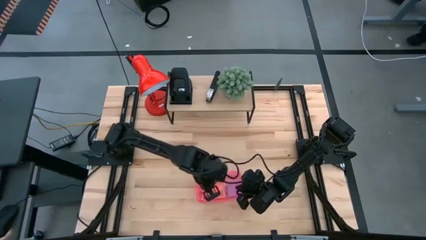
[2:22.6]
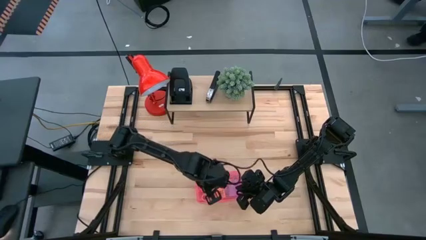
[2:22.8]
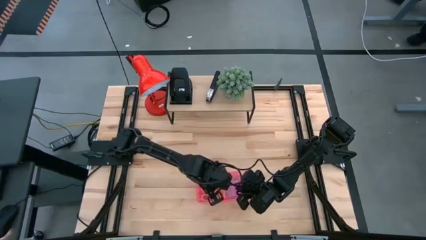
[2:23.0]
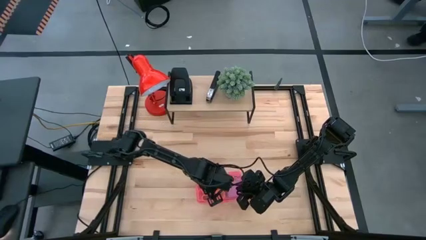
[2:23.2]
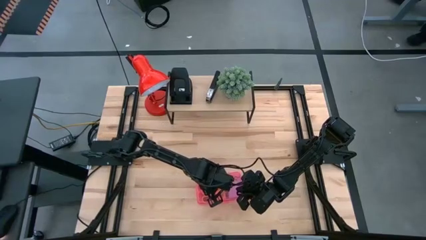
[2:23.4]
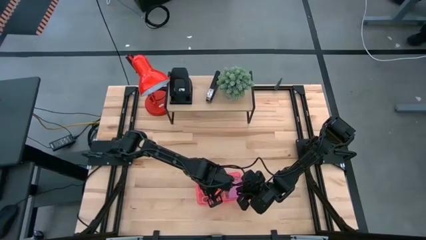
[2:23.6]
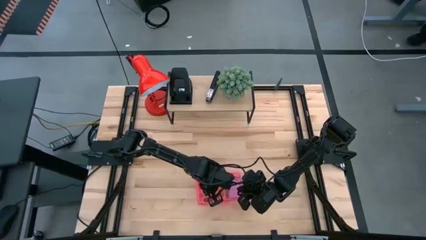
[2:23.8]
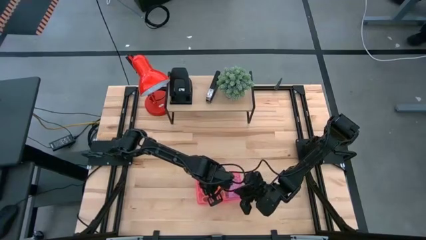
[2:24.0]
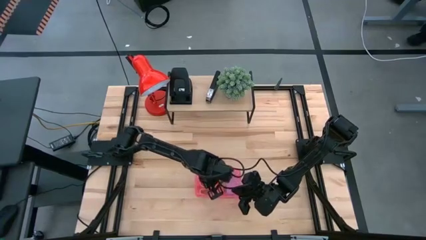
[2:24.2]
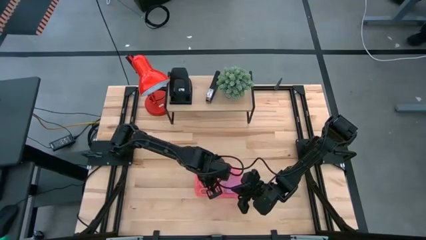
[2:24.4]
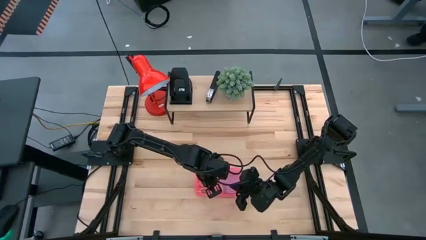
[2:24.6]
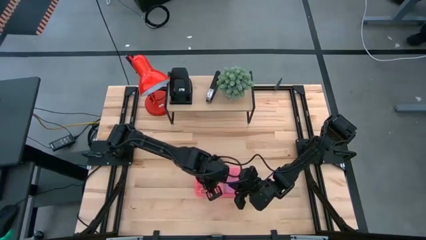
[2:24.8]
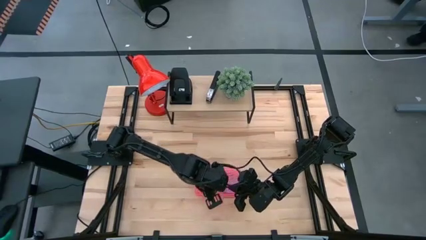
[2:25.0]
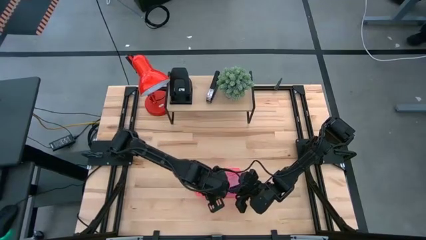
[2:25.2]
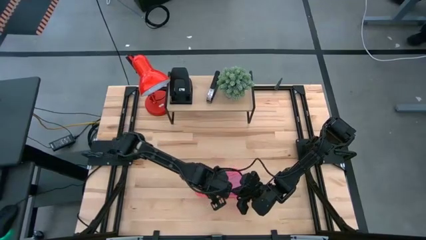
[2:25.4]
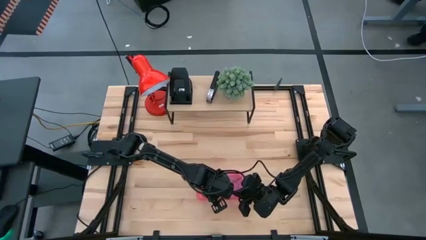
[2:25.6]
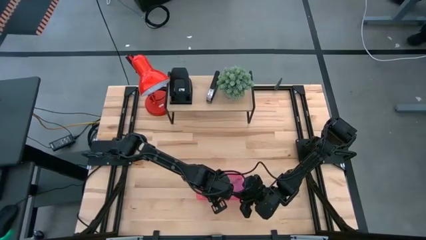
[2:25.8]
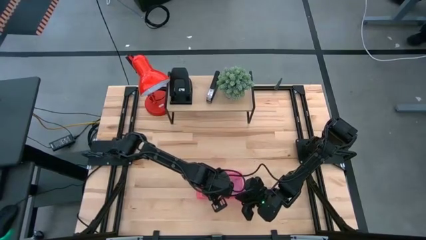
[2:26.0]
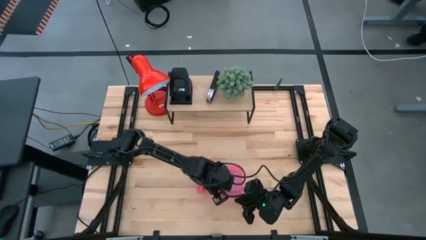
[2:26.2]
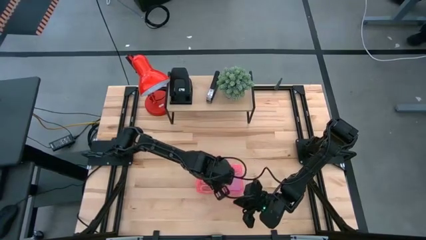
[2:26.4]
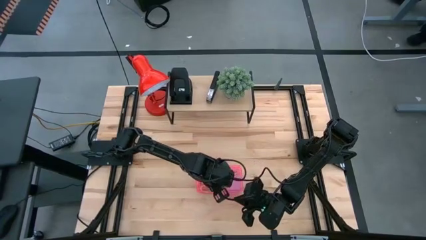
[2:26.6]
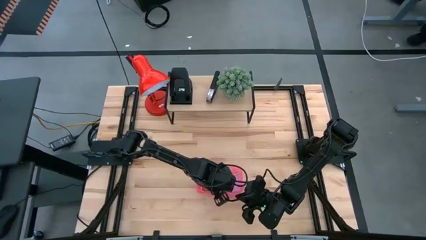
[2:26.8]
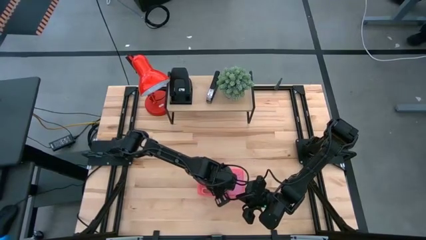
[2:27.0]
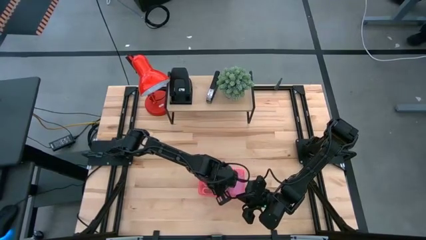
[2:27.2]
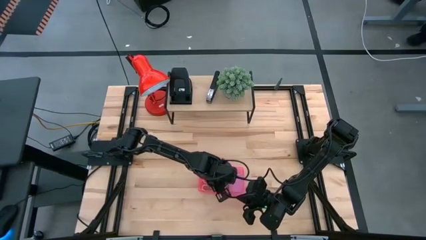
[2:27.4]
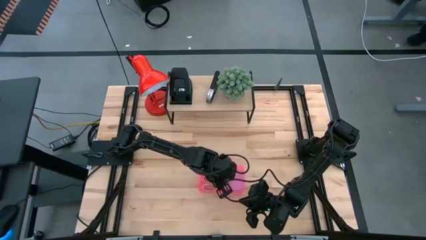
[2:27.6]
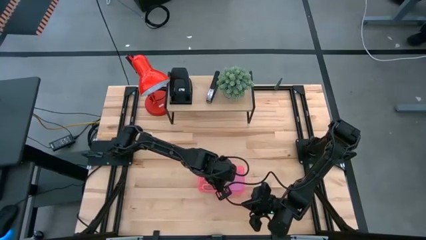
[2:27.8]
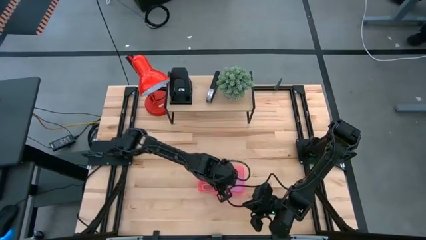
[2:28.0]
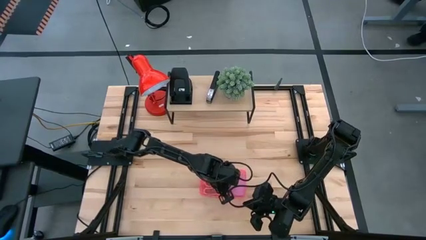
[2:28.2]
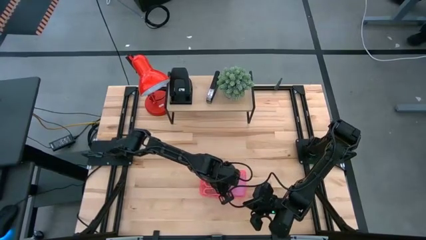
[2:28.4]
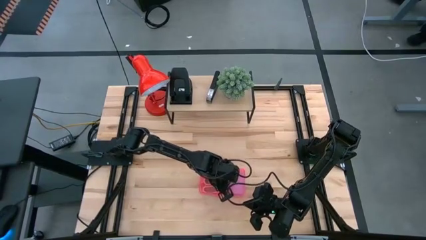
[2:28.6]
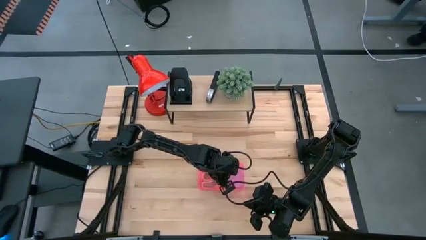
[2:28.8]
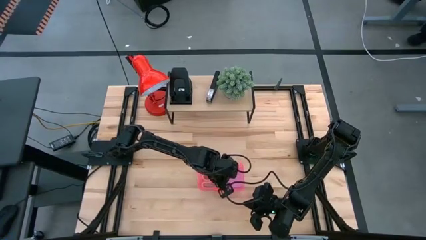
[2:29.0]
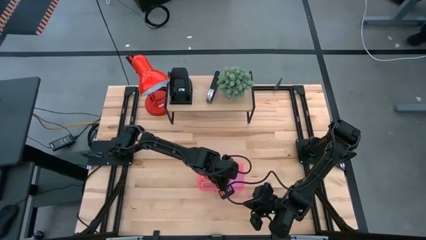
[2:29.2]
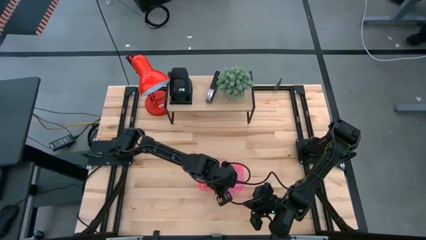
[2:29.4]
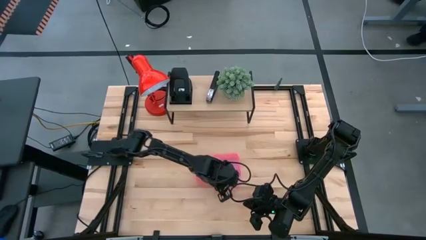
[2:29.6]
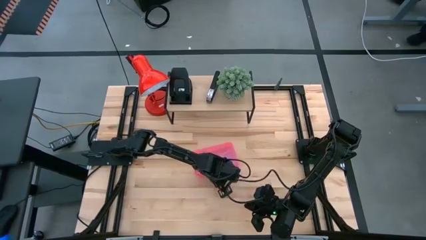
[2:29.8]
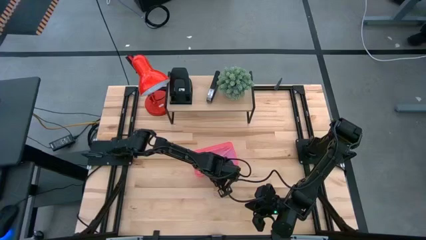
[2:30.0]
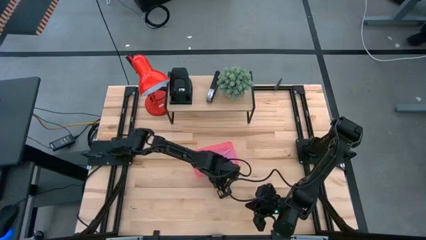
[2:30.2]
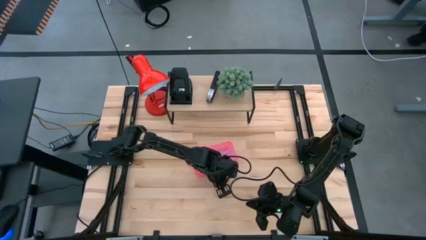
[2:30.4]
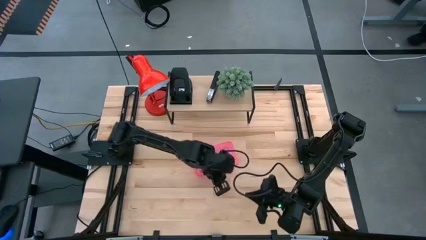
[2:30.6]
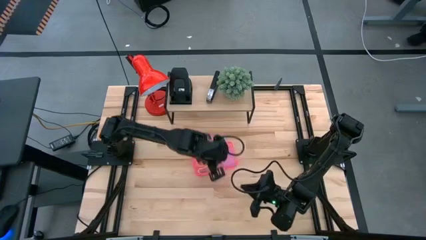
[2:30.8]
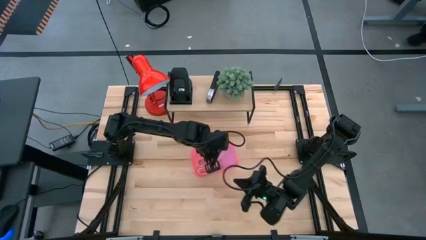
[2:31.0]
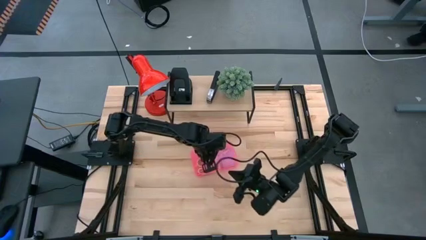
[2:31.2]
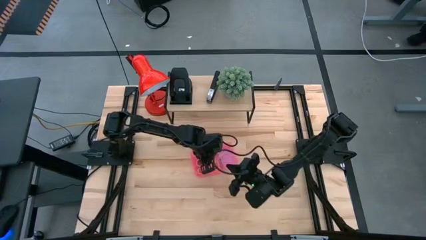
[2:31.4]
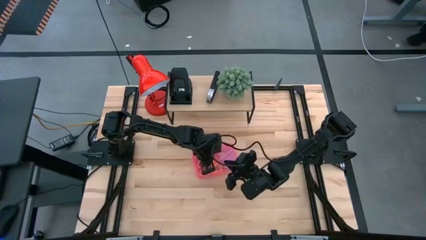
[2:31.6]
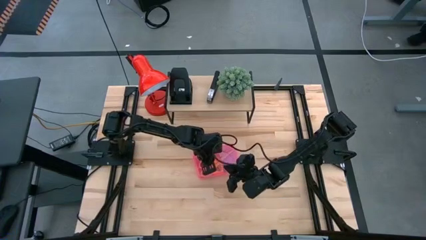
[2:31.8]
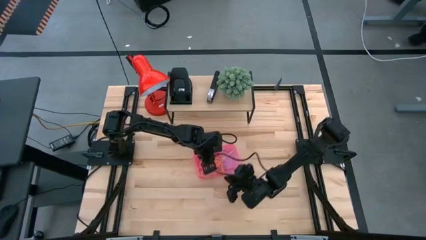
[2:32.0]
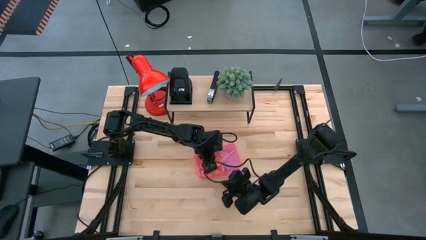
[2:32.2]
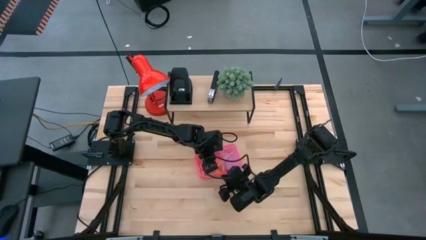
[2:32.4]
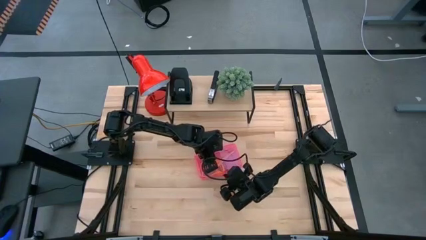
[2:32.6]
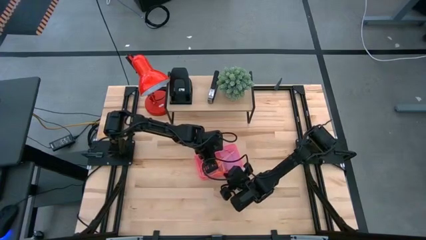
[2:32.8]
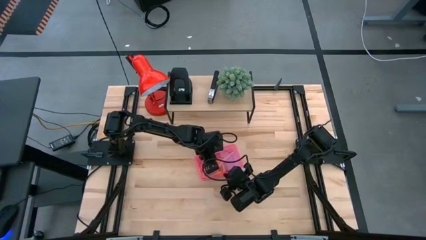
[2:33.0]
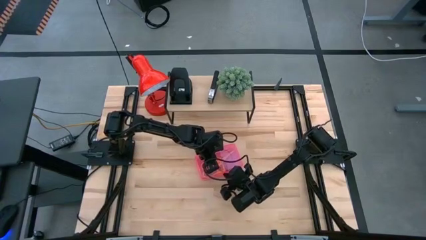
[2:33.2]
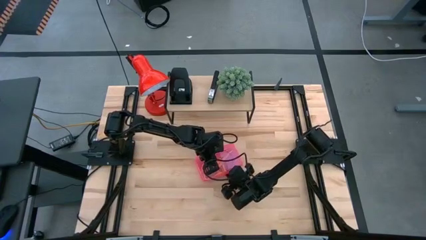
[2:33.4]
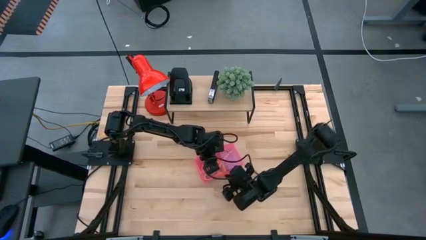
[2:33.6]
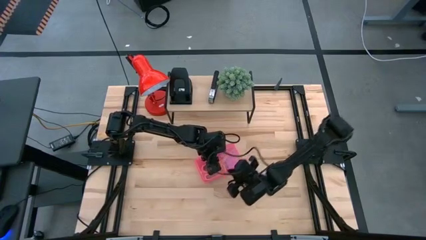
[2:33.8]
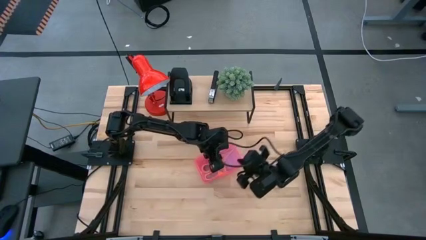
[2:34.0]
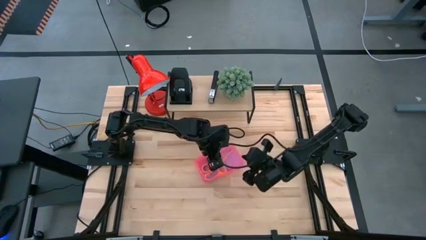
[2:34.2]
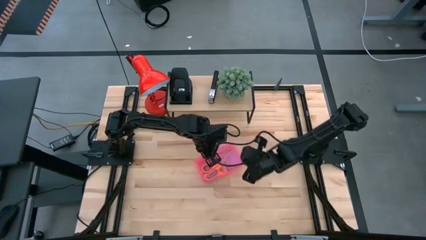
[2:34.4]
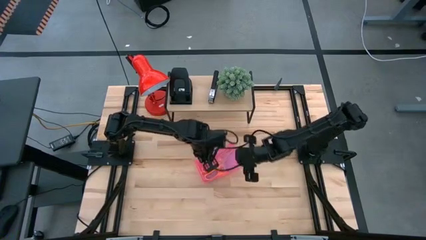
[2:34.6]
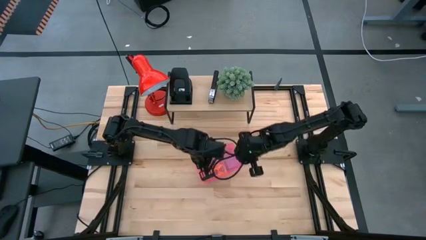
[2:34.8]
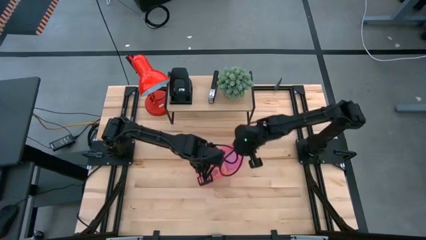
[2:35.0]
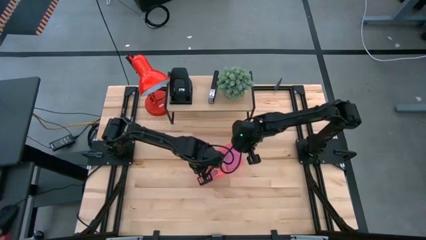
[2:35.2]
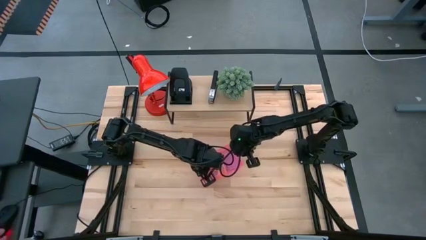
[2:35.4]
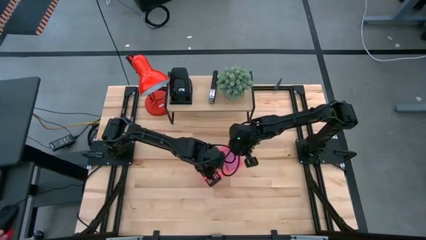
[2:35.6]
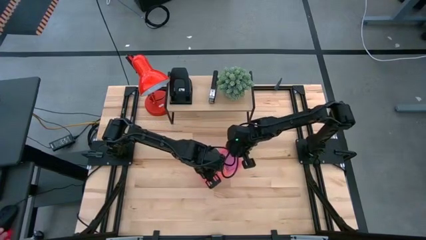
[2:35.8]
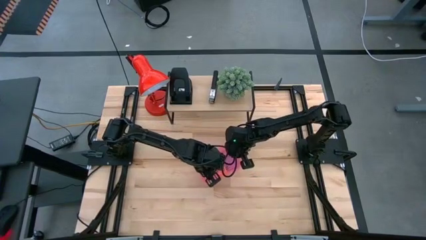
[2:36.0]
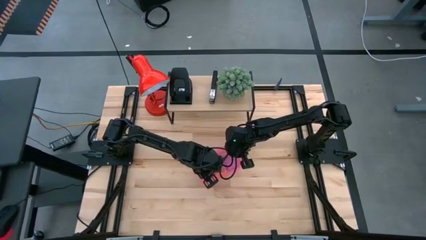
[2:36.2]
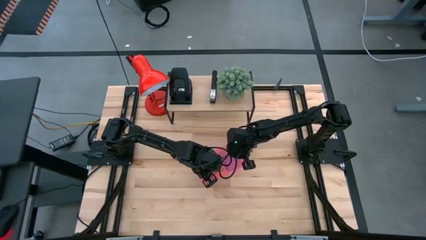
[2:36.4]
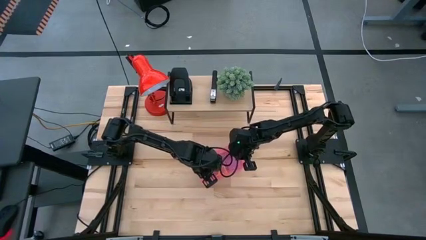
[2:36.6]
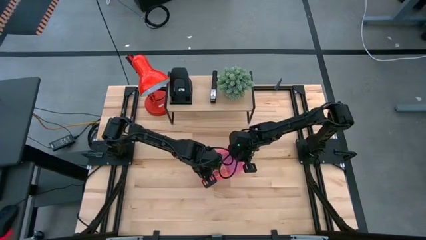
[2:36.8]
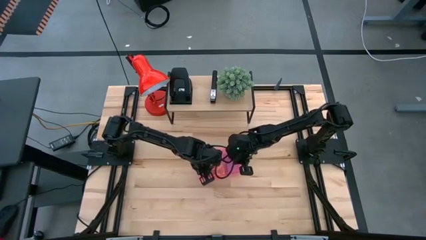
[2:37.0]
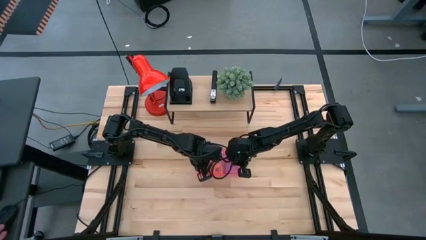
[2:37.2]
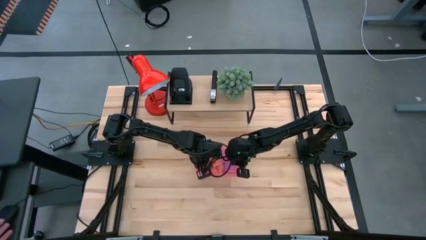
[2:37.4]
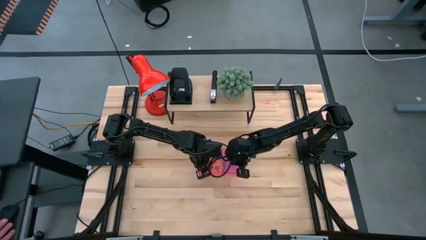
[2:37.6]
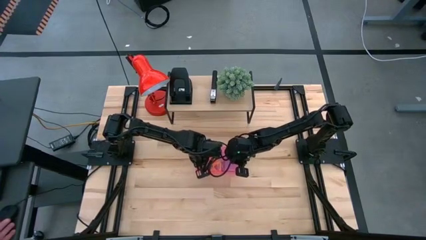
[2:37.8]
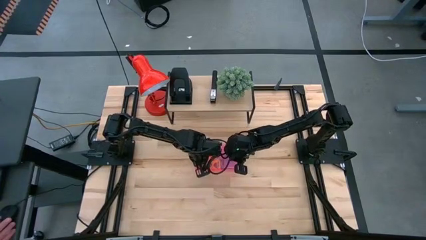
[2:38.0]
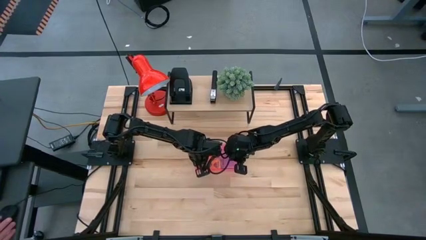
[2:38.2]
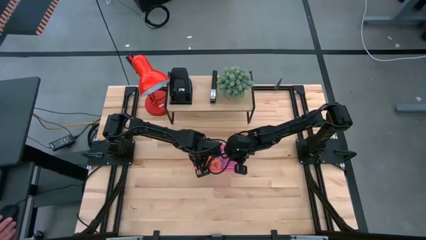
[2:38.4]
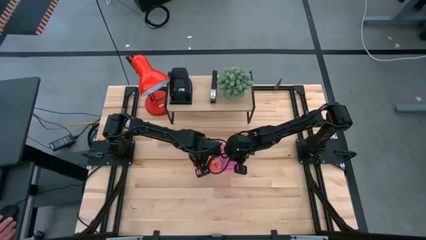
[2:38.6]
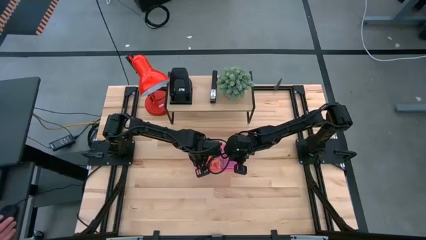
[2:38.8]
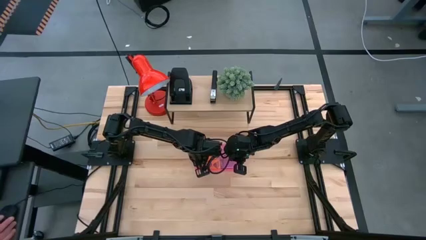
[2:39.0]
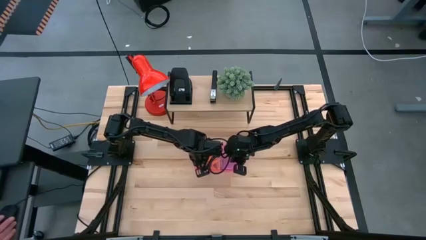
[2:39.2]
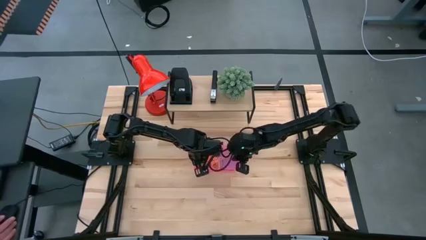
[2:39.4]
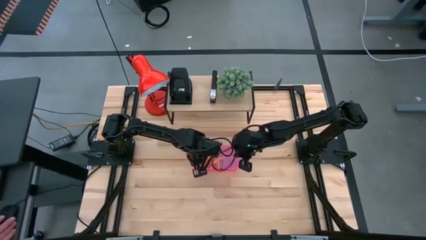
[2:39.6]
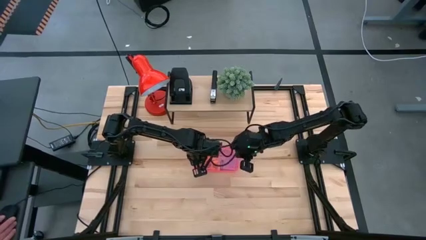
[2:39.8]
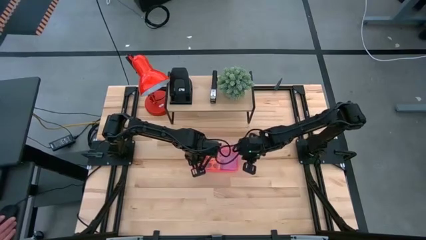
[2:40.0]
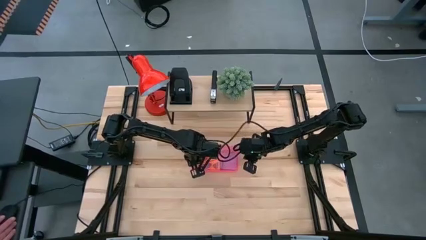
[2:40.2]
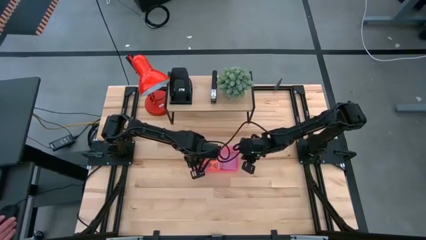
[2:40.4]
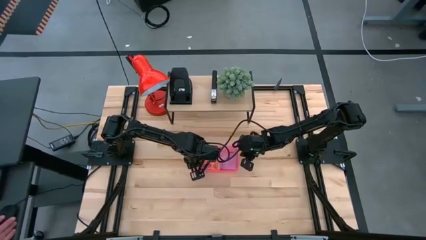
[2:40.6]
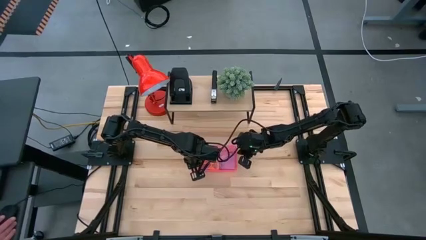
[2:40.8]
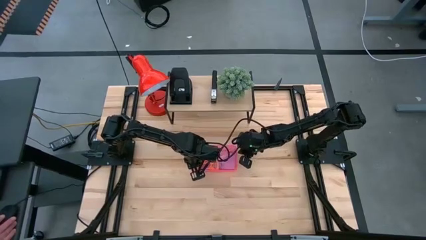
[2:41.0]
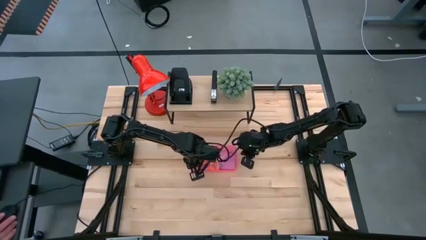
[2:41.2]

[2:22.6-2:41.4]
Task: Pack school essentials
Close the pink supply box
